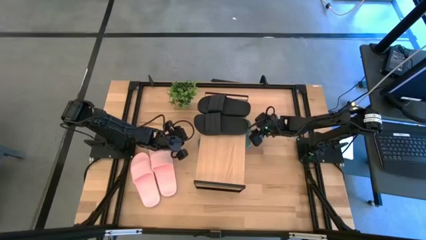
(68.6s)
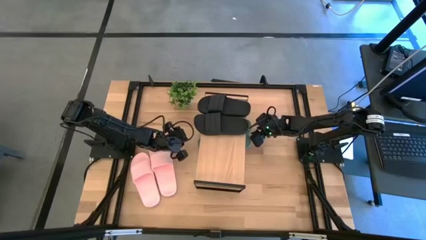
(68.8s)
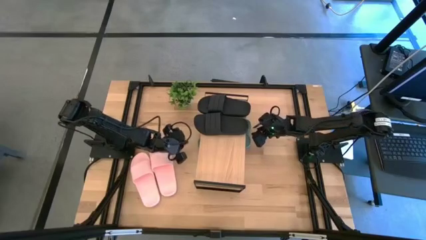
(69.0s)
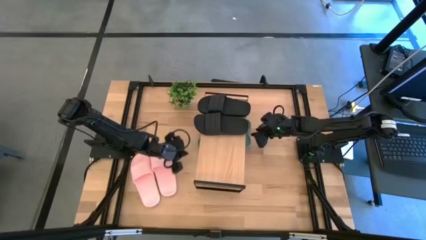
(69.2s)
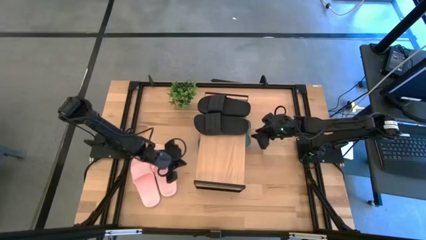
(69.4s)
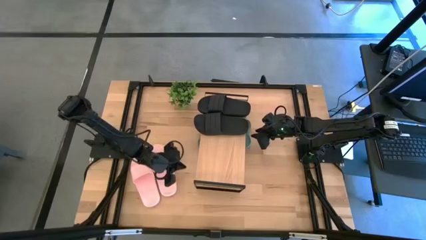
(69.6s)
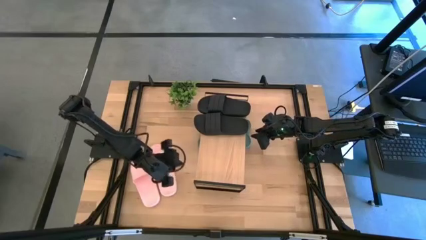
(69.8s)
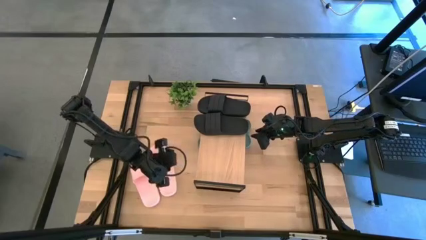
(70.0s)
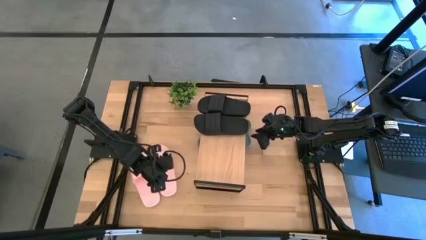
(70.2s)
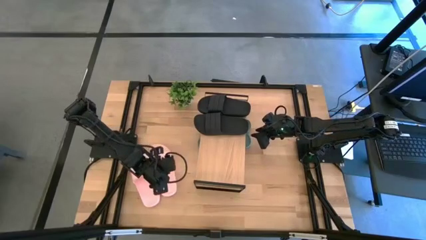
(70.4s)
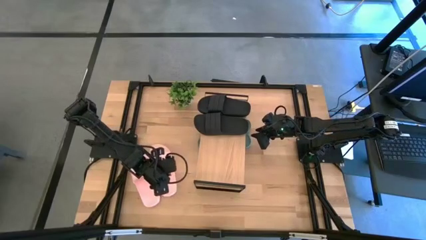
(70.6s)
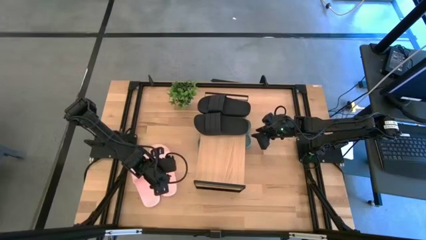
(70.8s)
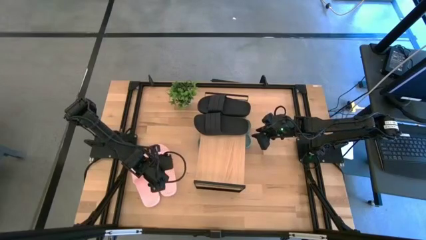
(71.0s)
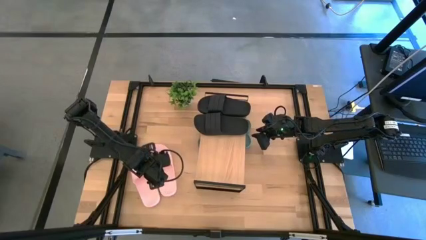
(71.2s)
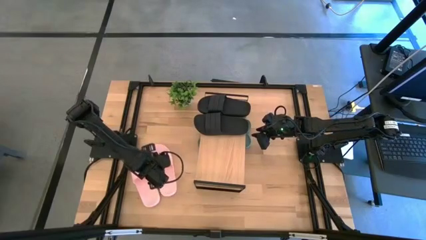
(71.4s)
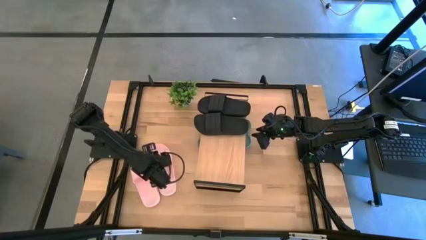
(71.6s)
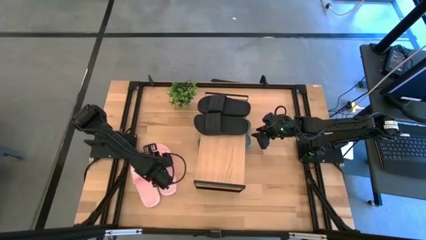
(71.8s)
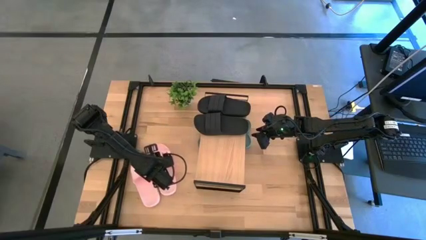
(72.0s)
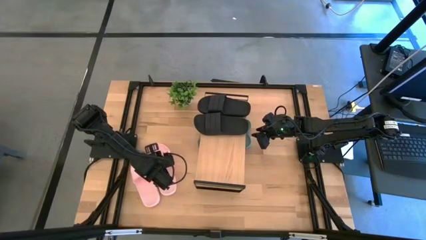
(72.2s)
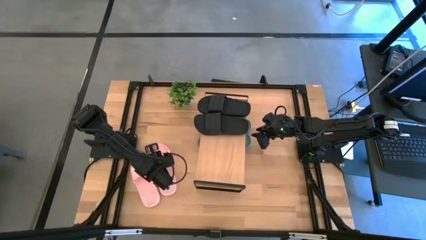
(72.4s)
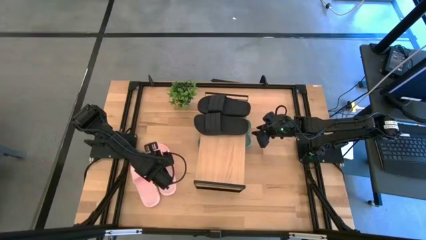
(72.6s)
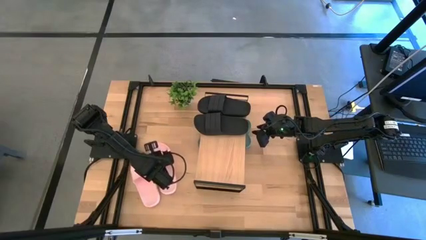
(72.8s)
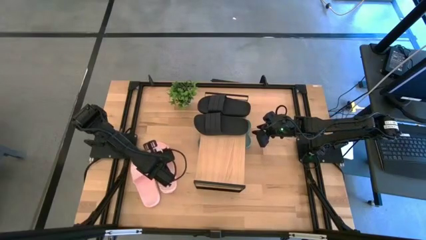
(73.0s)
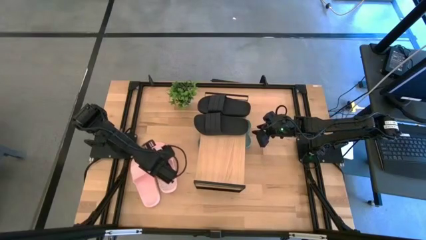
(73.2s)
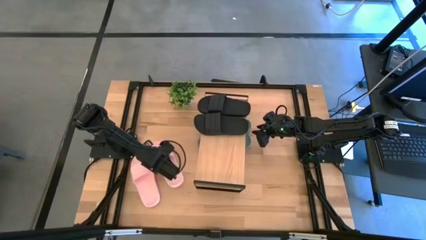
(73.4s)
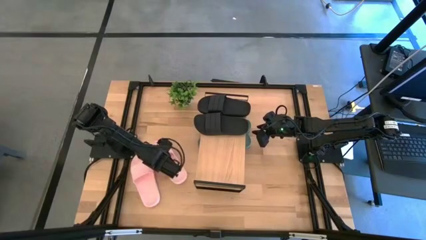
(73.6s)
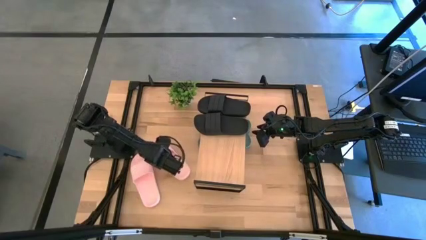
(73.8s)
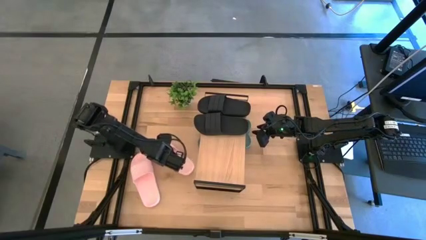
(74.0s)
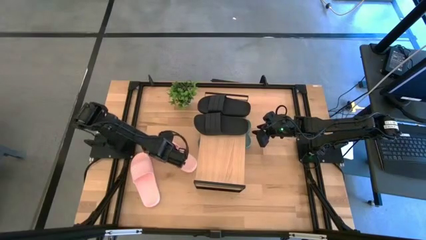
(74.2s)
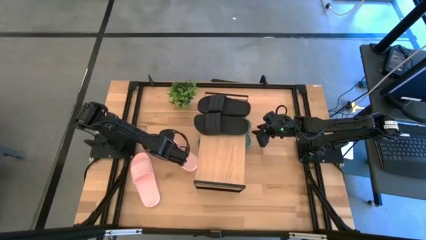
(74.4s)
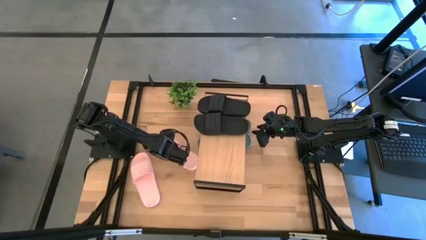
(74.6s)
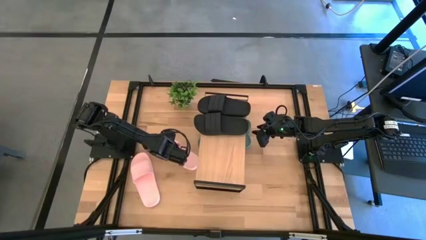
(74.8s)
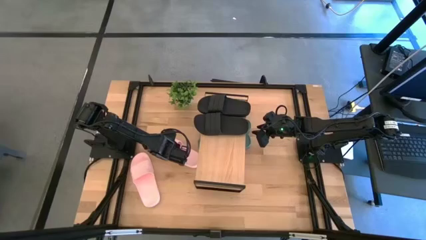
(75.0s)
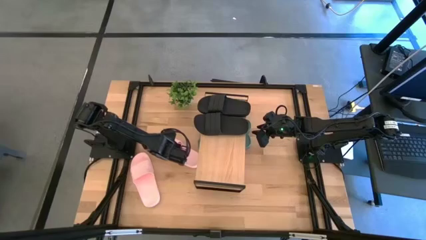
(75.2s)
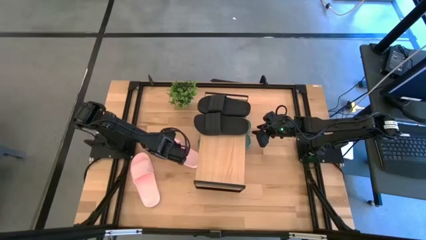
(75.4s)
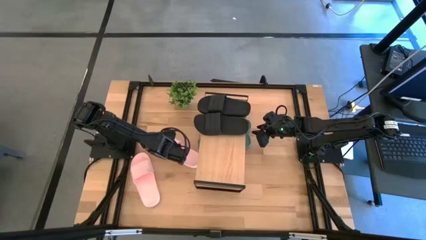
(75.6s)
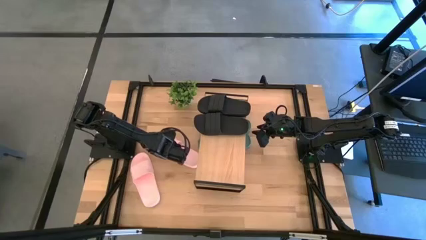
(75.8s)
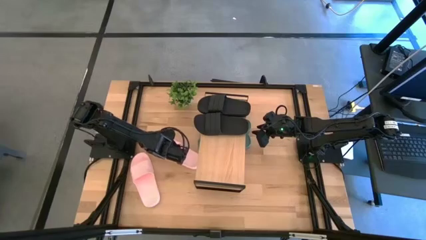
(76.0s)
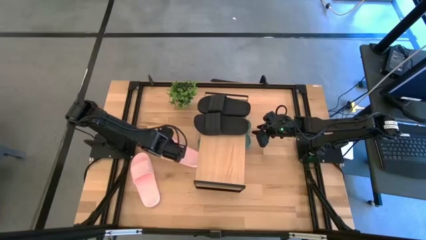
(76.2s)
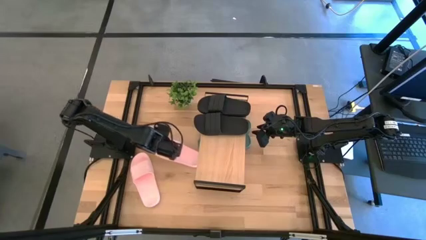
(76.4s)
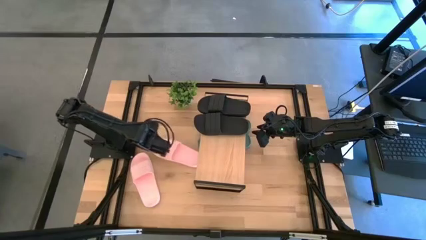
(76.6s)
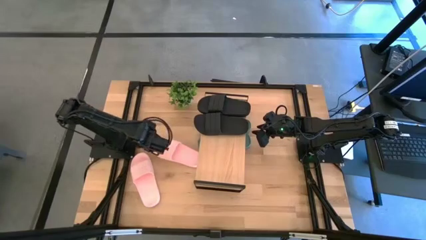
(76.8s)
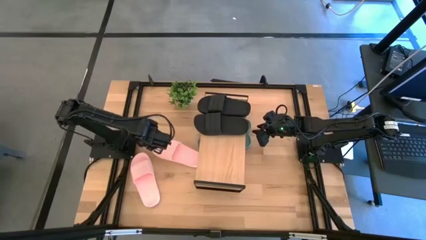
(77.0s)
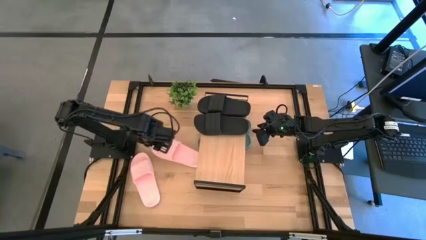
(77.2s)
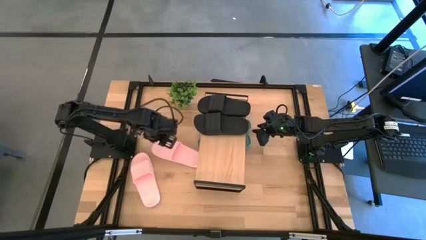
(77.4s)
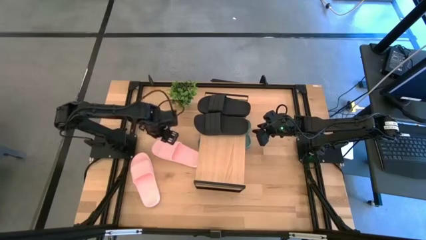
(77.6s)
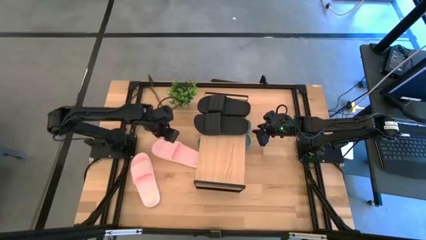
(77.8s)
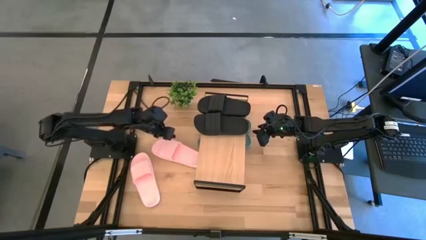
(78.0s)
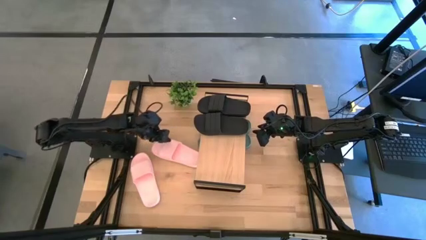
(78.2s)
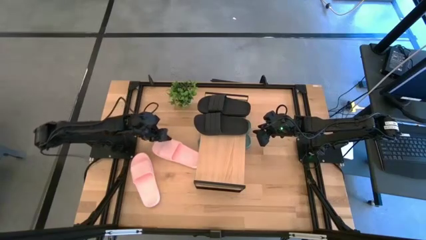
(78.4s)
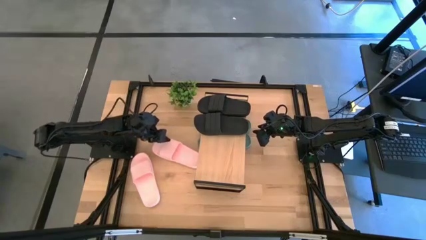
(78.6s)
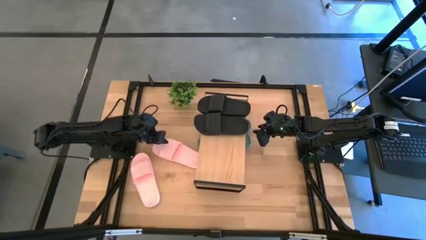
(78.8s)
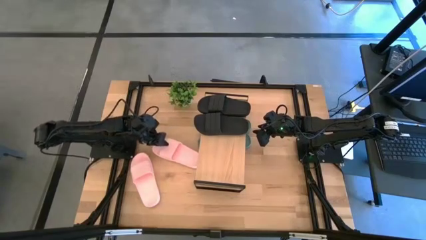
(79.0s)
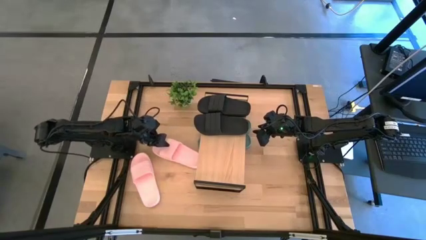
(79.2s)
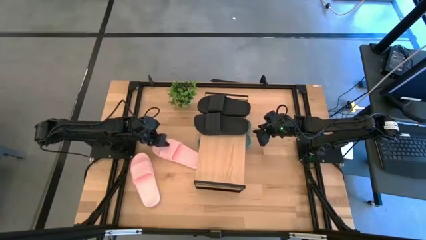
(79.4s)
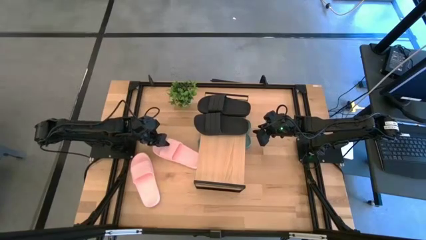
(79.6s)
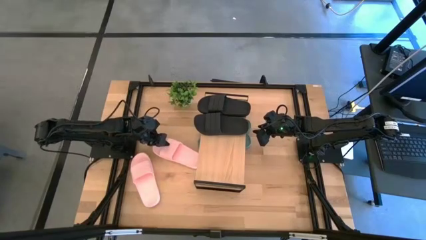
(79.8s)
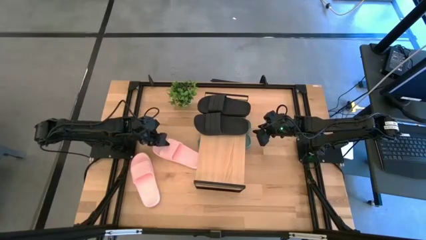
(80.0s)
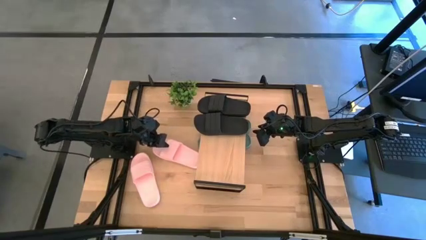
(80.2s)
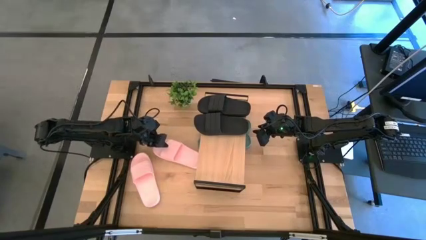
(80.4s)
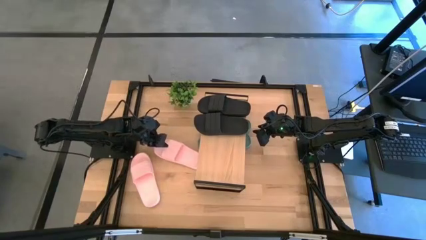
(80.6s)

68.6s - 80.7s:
Task: Pick and place slides into the shelf
Put the right pink slide under the shelf

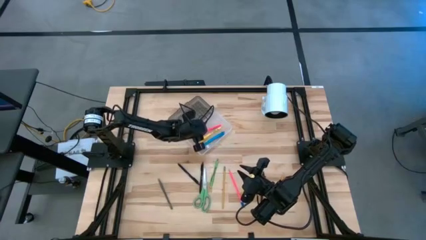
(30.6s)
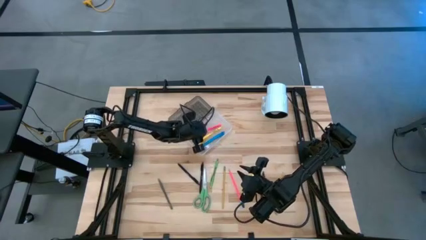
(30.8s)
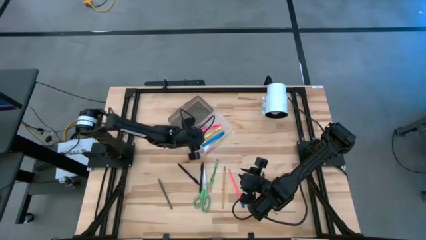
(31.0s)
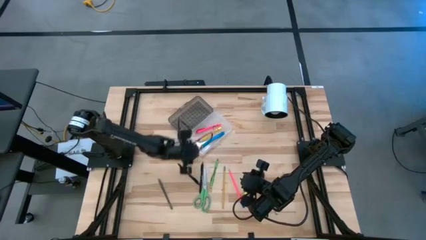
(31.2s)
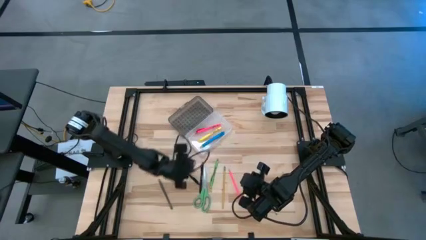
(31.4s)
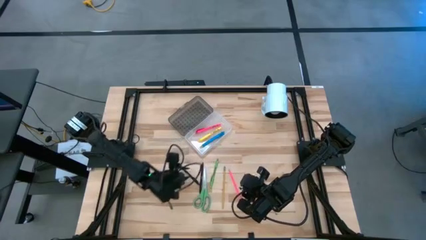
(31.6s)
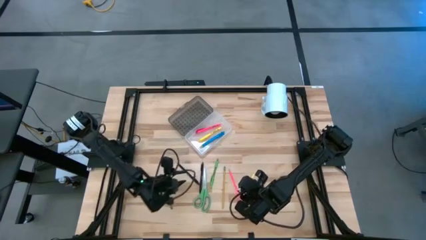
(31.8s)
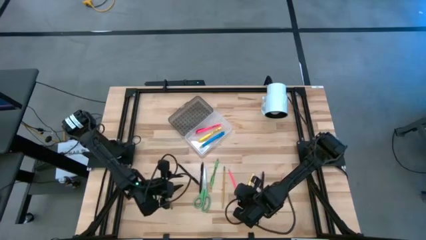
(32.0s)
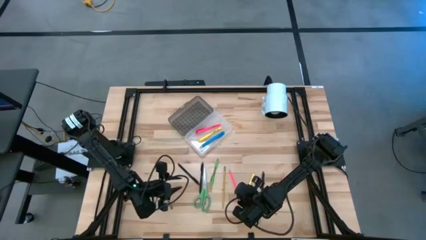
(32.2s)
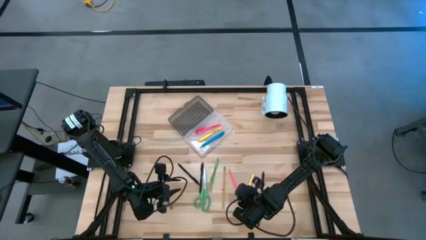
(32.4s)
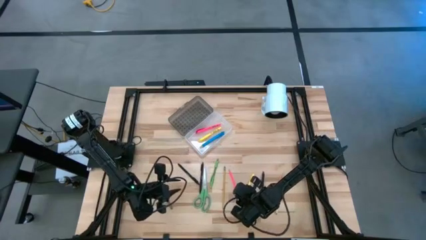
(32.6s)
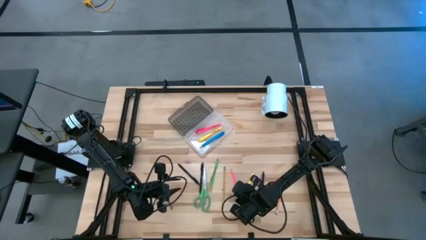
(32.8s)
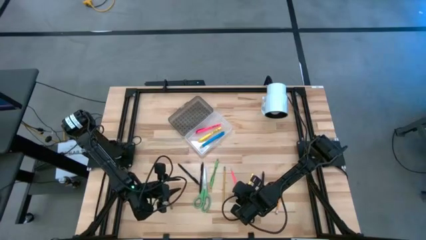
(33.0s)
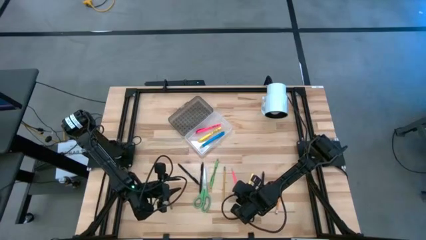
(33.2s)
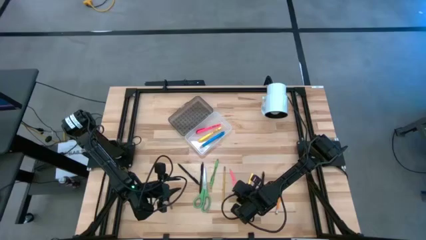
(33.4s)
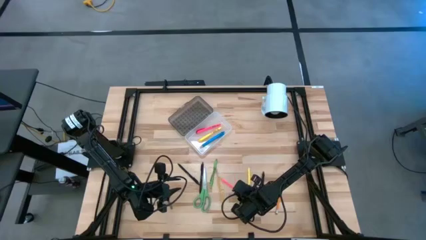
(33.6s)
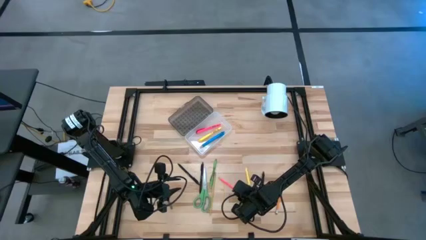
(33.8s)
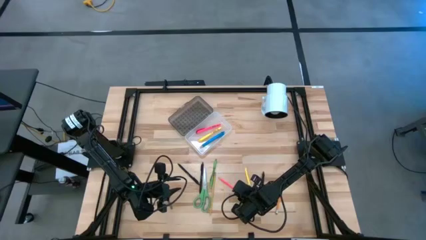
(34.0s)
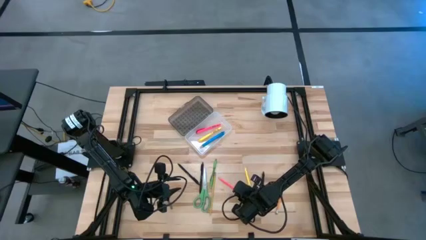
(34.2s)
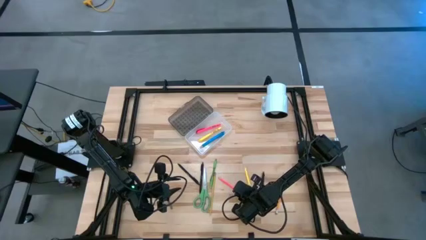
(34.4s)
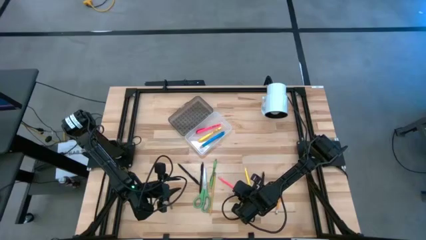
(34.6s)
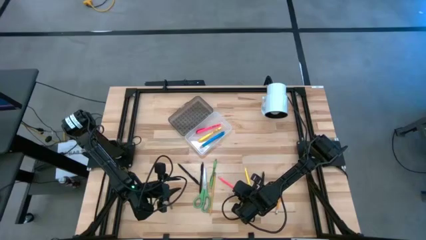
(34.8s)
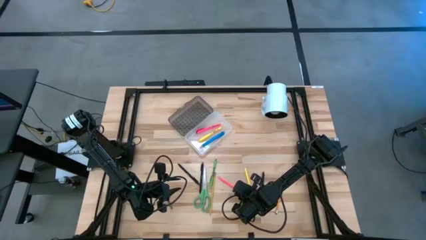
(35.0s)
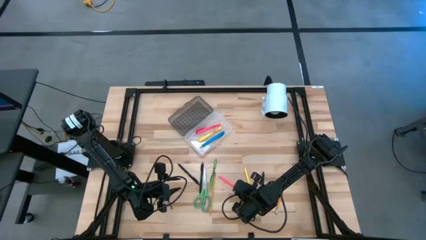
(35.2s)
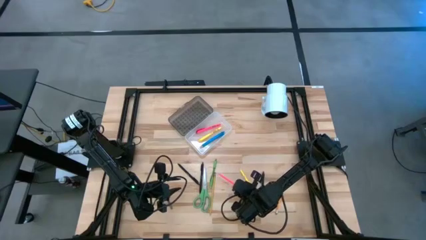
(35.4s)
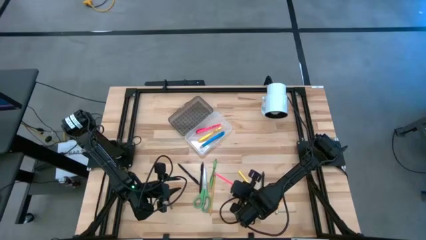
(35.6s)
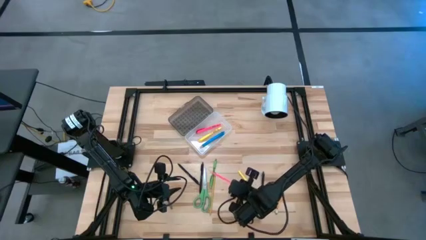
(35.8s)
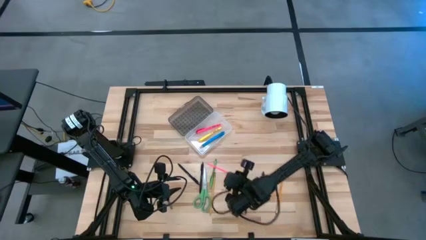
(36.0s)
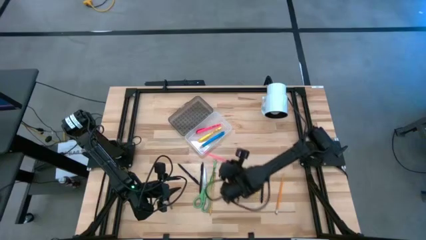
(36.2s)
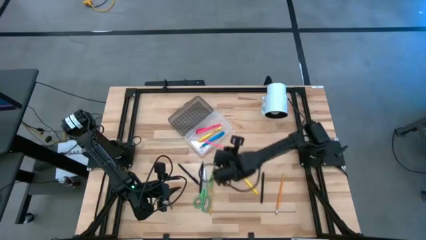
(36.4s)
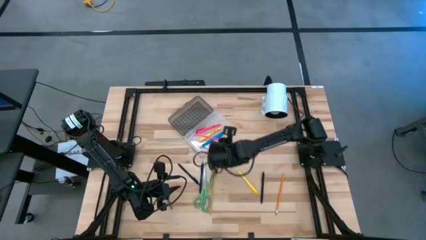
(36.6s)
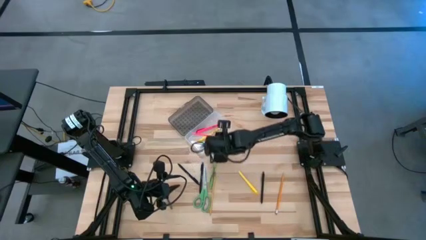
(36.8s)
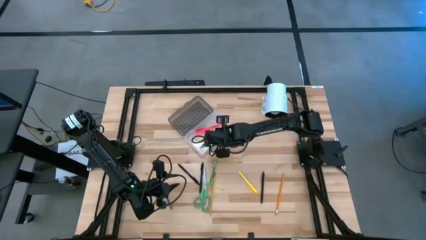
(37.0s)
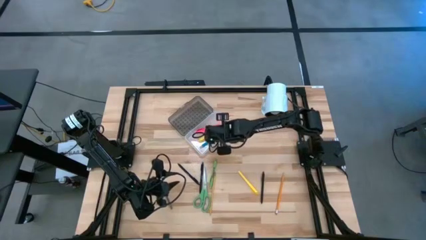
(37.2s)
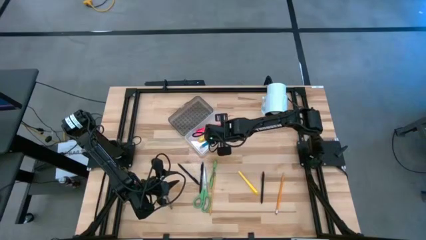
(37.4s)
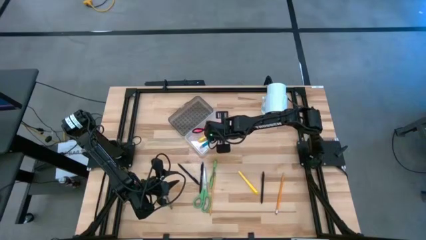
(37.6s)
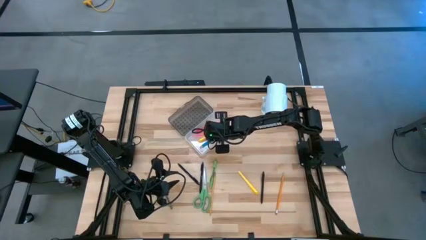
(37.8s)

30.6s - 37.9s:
Task: Pick & place school supplies into a supply box
Put the pink pencil into the transparent supply box
